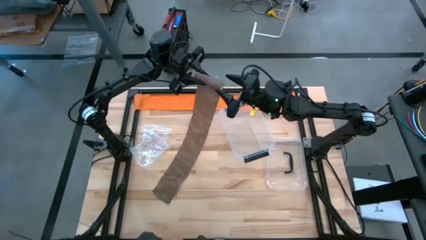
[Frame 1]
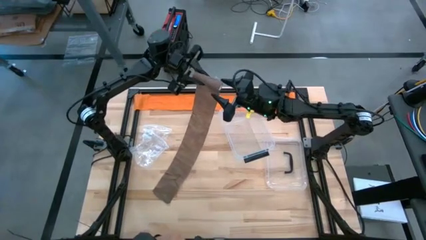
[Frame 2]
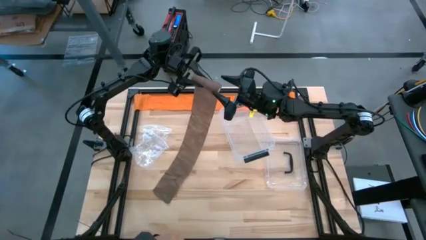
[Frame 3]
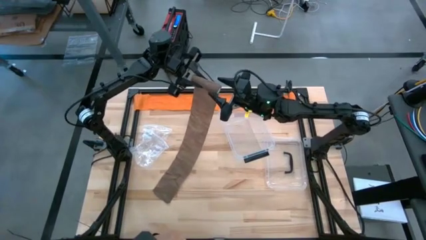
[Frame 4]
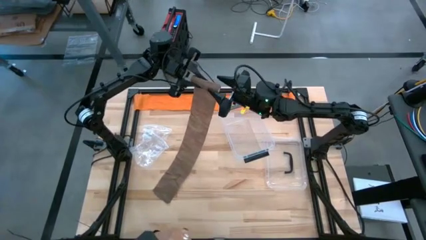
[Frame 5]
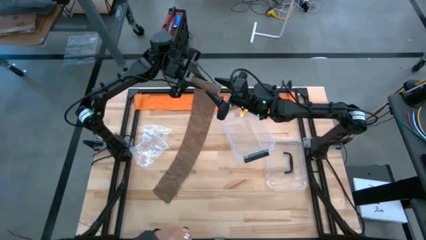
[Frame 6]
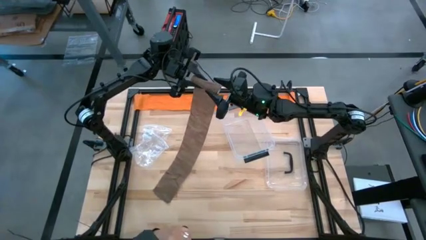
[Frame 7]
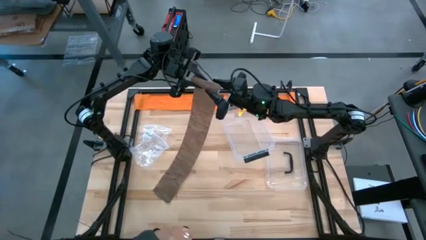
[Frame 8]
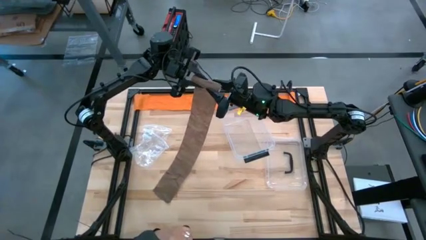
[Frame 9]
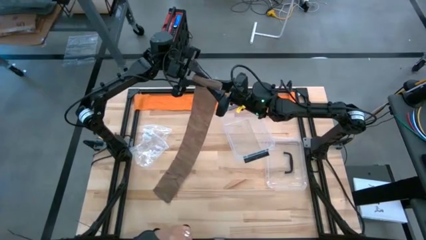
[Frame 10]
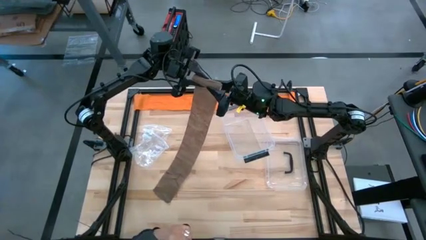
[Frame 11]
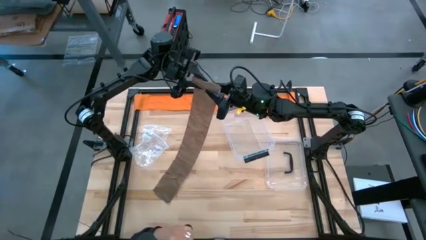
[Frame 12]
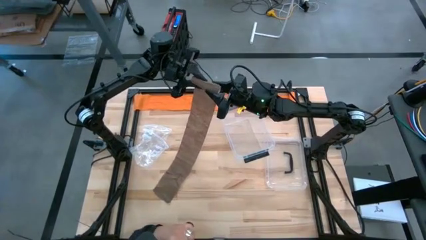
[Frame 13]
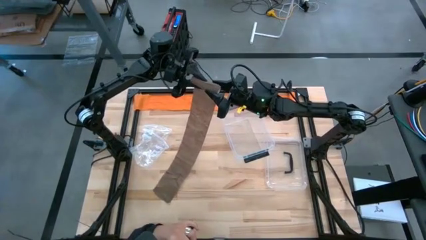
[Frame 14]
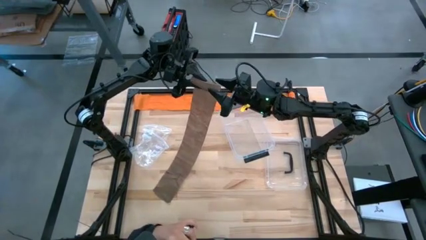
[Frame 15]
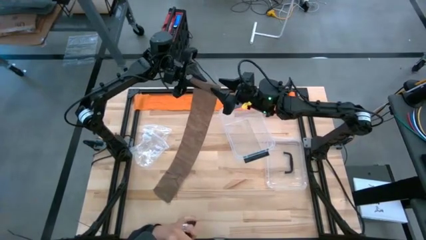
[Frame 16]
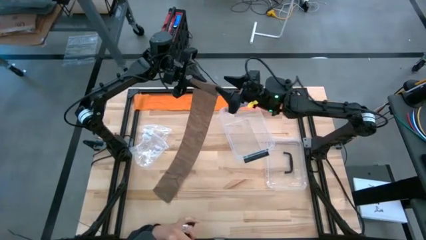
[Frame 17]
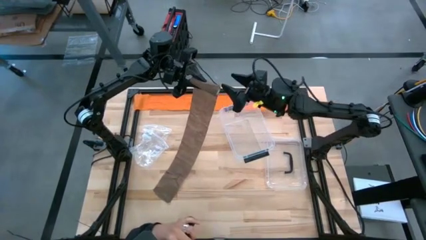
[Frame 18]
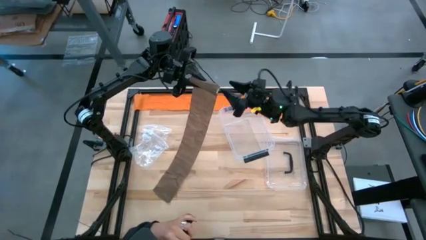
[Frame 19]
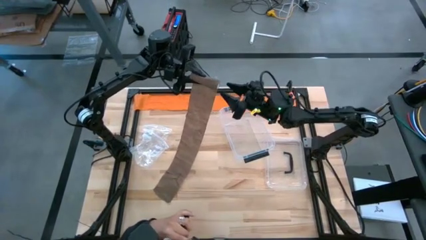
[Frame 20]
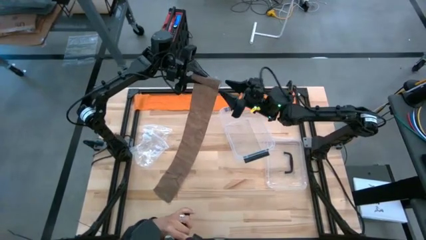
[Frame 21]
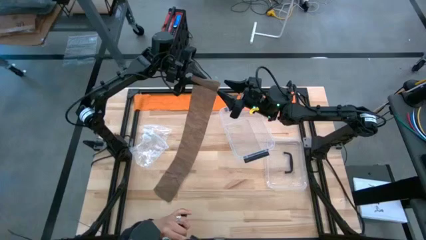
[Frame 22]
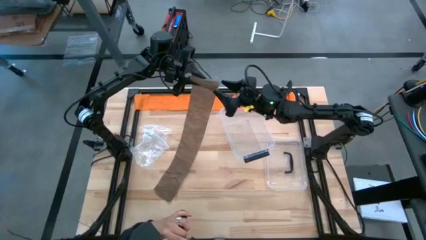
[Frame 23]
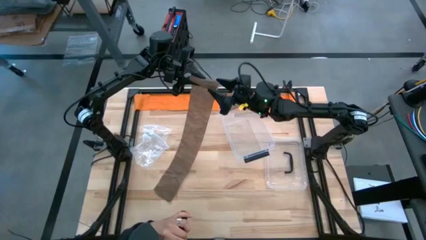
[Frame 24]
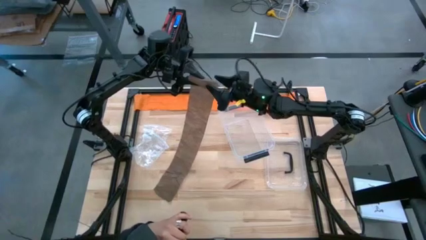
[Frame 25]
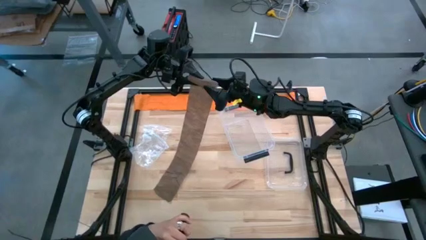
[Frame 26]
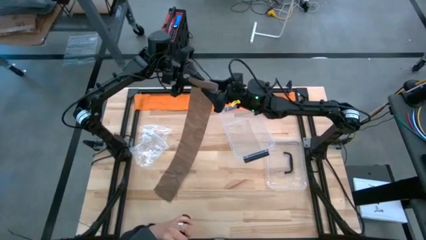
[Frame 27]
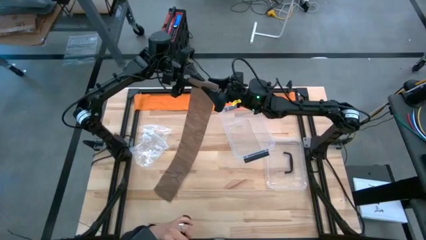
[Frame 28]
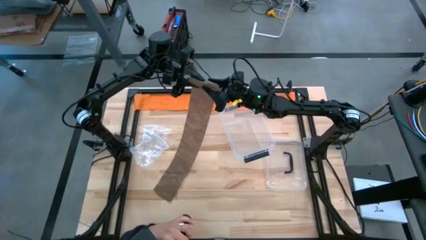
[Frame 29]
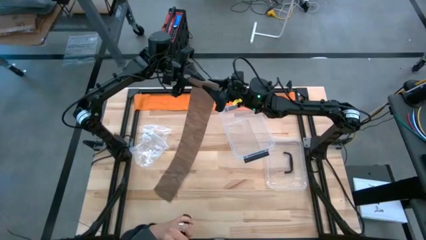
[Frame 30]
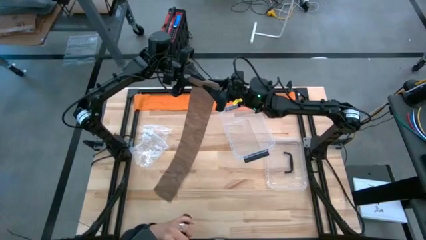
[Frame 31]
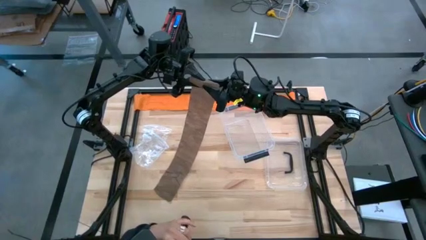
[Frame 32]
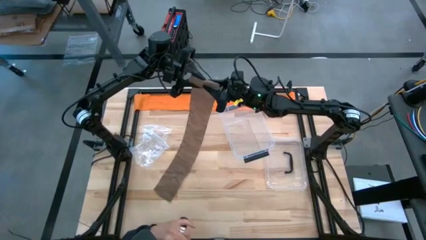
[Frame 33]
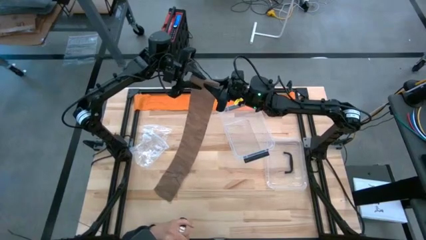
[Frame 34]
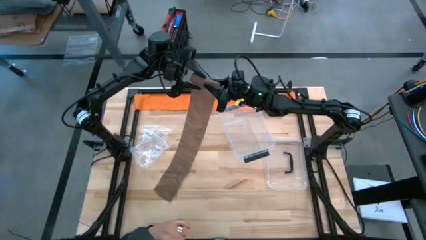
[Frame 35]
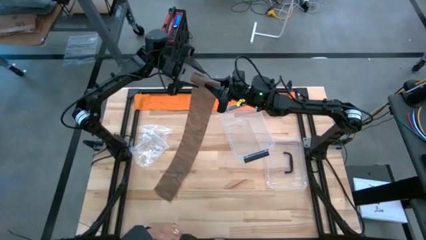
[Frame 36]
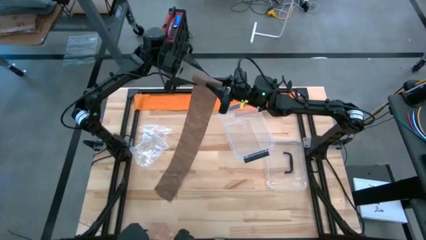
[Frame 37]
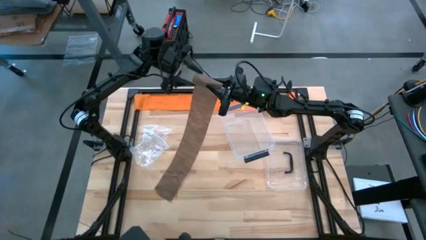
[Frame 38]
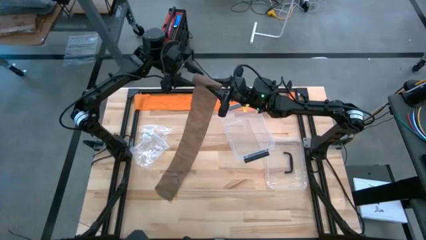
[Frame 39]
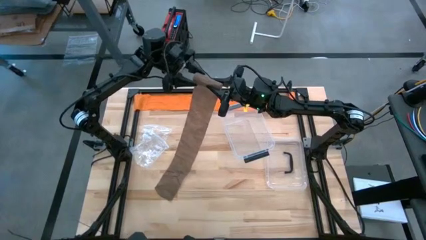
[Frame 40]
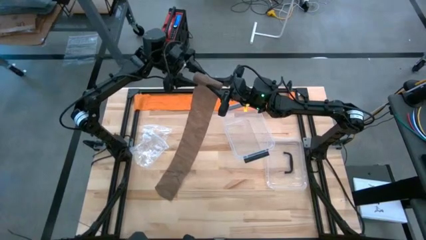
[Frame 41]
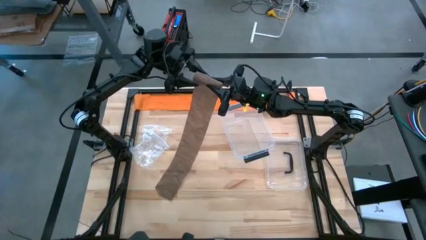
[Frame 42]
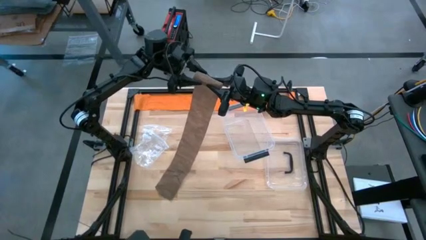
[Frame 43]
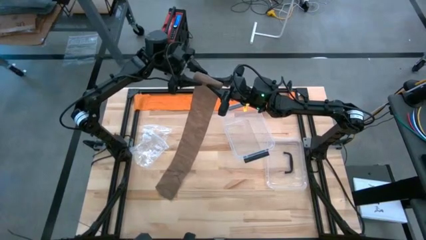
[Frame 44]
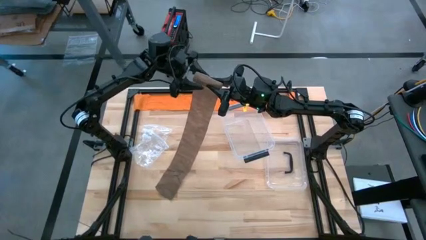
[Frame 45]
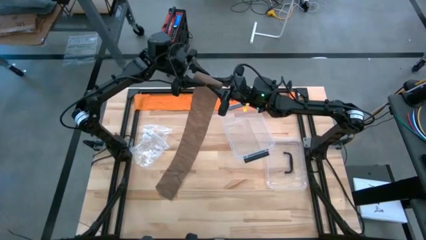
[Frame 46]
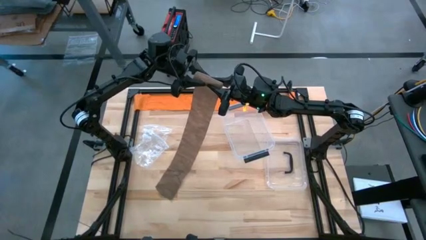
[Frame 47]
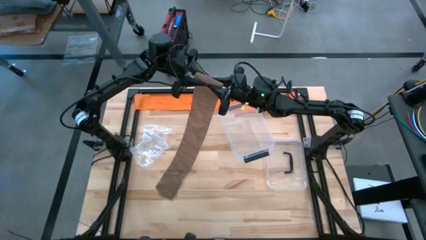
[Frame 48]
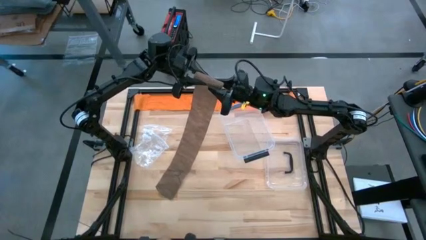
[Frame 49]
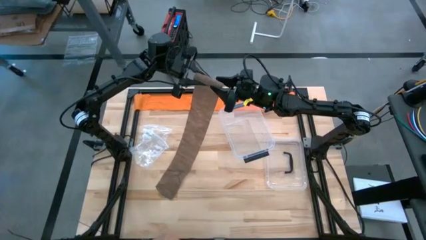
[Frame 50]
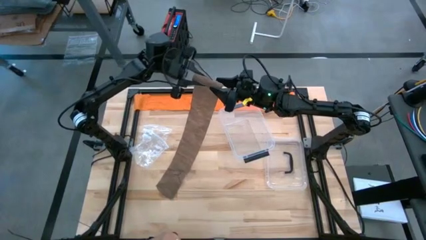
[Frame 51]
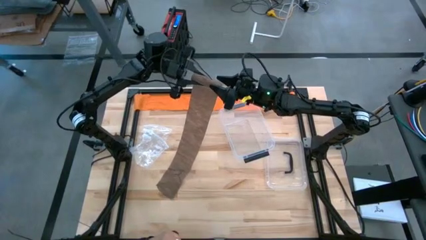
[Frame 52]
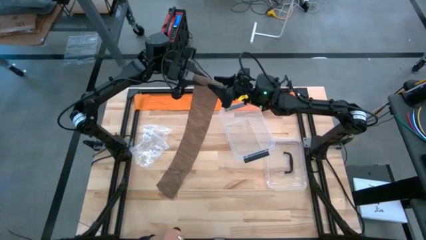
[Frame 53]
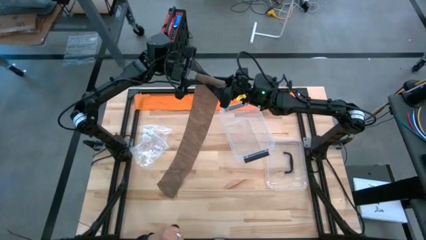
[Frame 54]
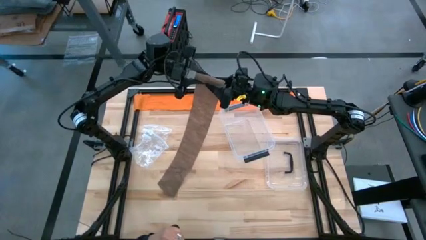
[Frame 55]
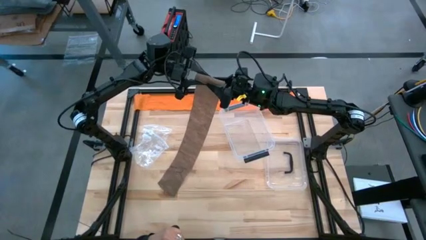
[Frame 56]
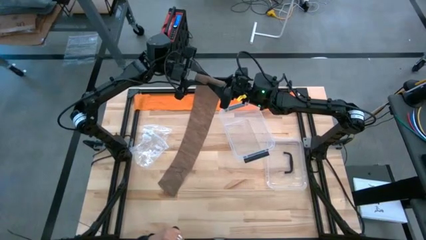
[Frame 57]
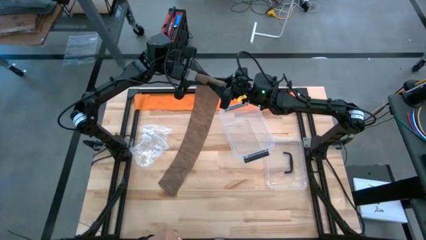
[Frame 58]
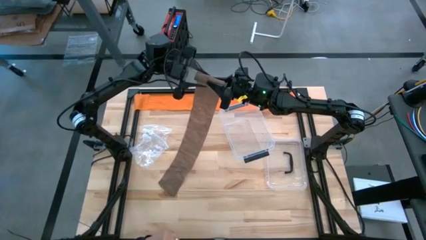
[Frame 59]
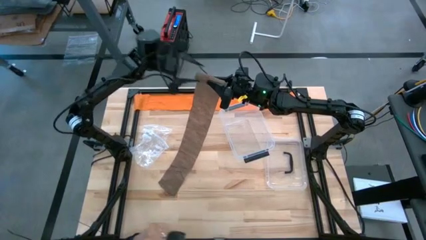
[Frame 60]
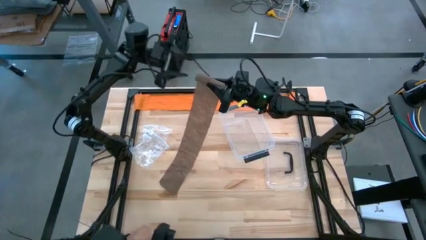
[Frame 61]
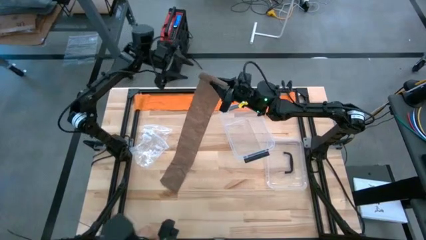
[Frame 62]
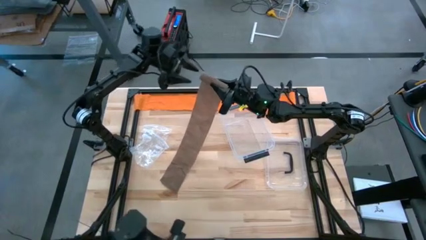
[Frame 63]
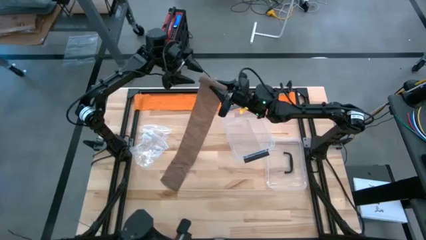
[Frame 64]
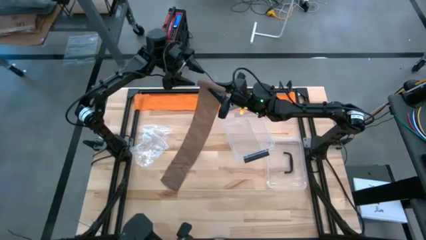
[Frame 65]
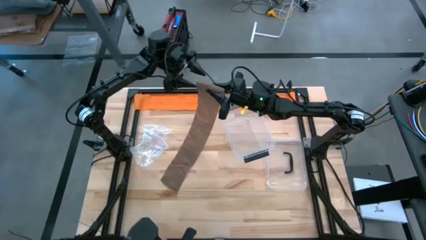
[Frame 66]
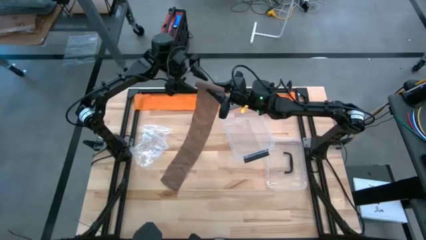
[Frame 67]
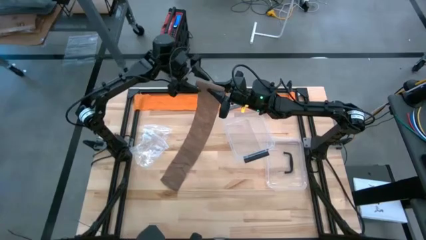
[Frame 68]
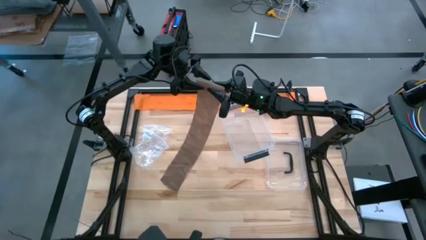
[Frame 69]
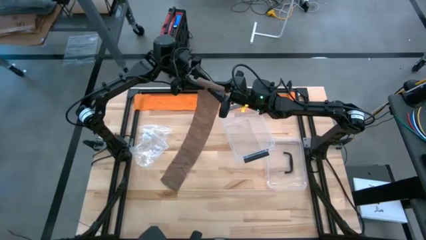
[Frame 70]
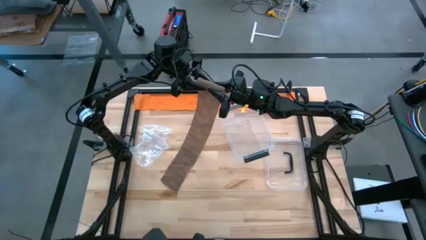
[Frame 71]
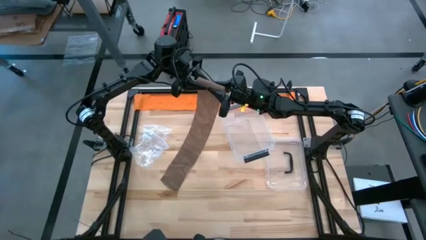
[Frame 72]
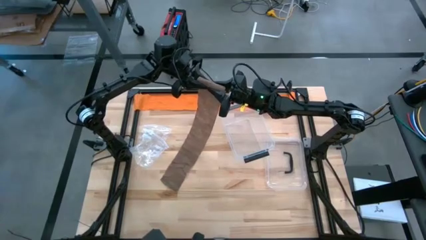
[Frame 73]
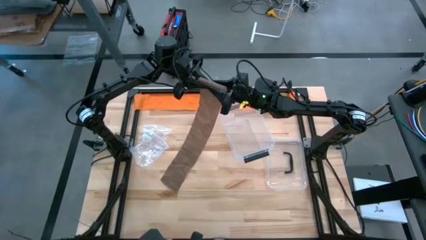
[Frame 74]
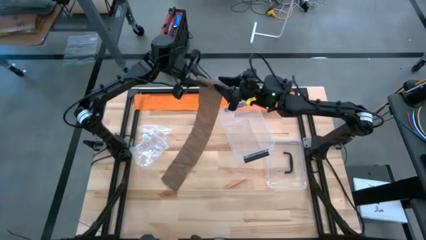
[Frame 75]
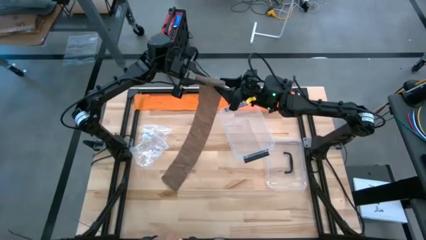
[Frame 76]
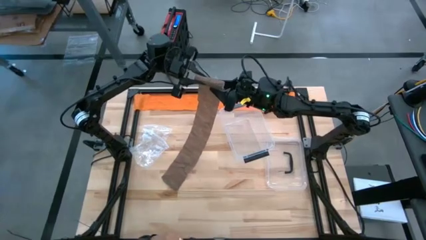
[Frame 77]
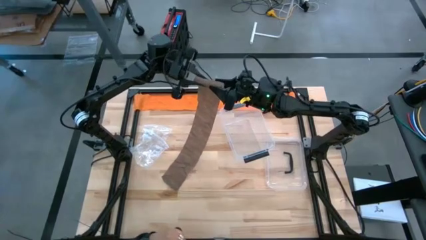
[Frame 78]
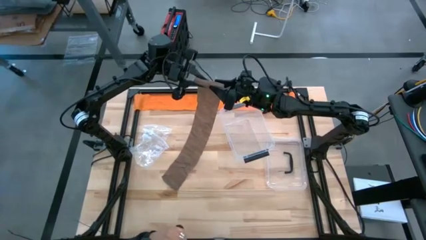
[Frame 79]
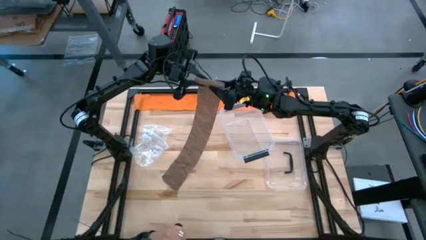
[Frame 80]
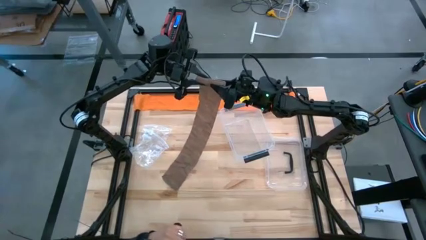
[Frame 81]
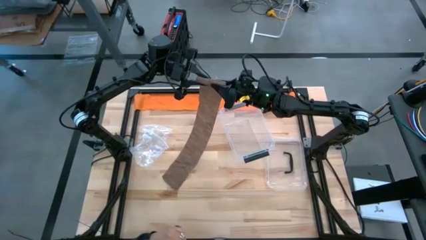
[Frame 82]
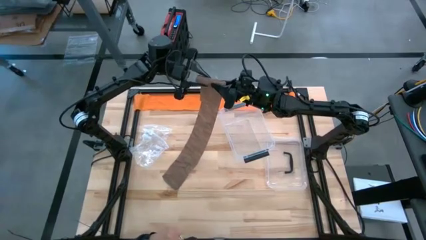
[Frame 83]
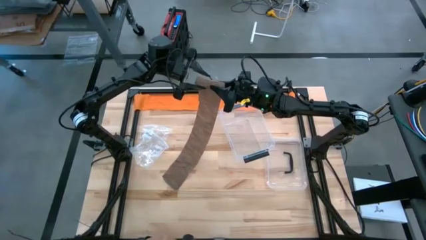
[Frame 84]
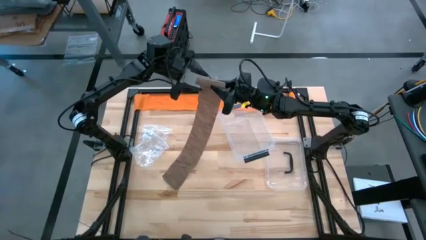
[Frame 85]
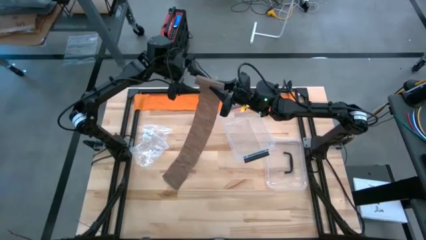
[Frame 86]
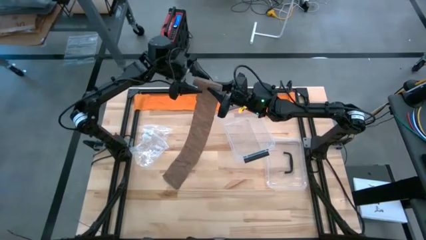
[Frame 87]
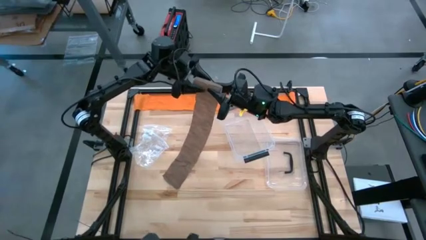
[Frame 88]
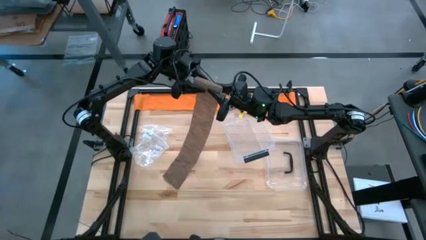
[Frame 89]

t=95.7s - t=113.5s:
Task: Roll bandage
Roll the brown bandage
